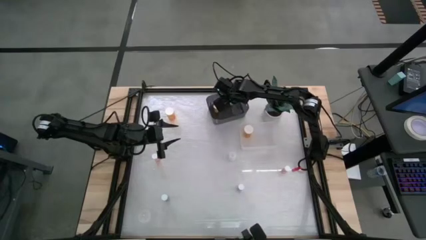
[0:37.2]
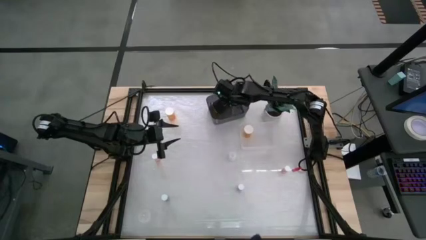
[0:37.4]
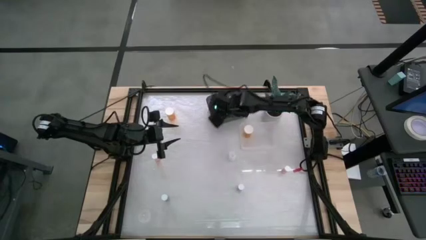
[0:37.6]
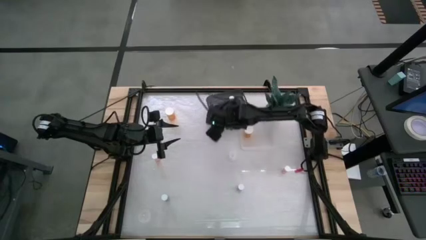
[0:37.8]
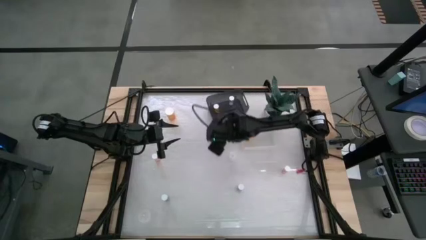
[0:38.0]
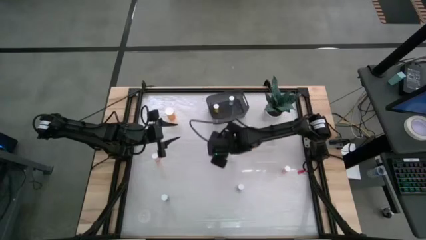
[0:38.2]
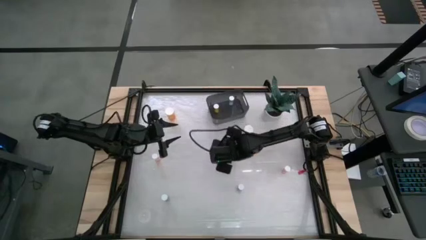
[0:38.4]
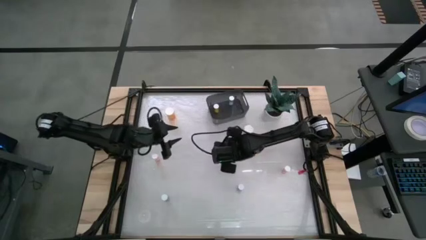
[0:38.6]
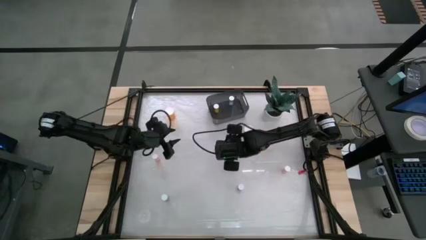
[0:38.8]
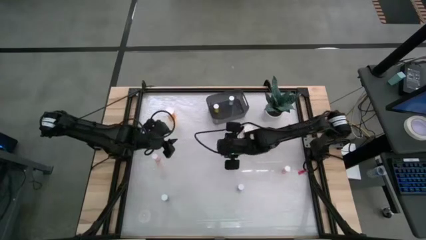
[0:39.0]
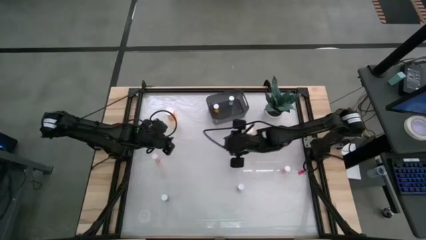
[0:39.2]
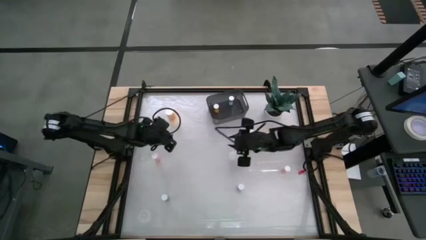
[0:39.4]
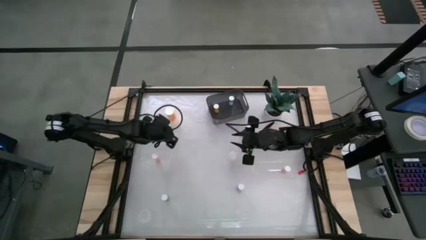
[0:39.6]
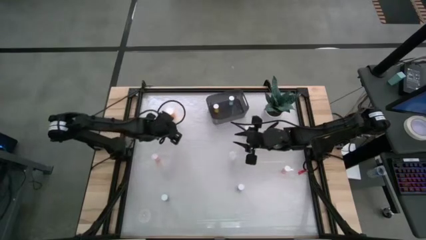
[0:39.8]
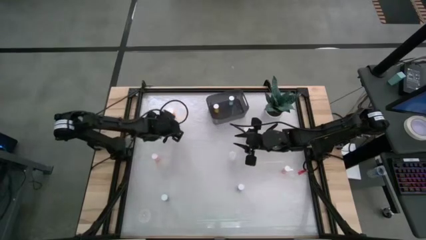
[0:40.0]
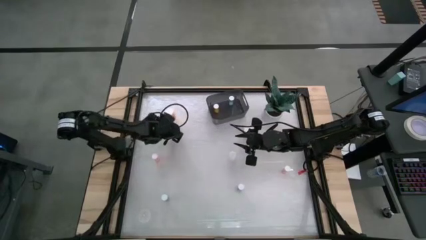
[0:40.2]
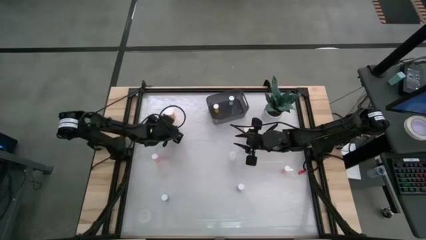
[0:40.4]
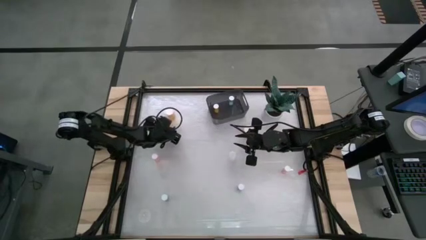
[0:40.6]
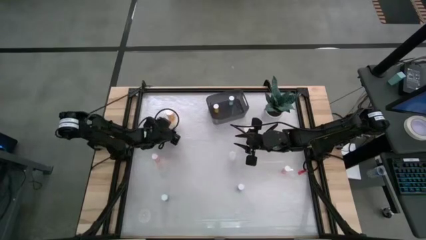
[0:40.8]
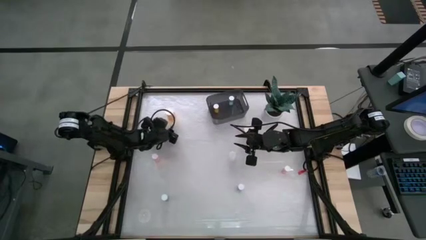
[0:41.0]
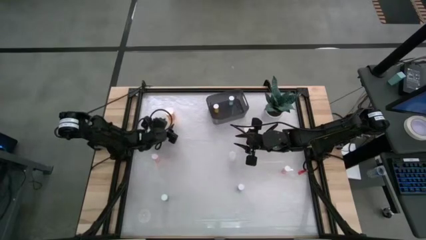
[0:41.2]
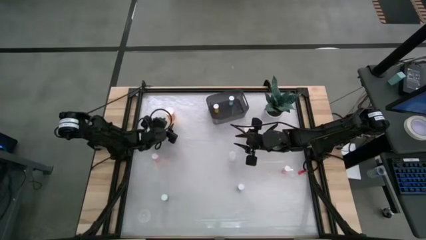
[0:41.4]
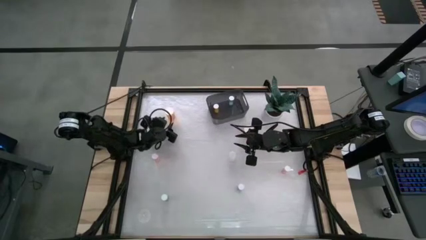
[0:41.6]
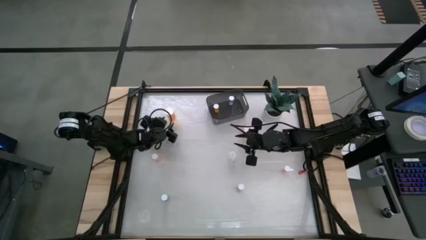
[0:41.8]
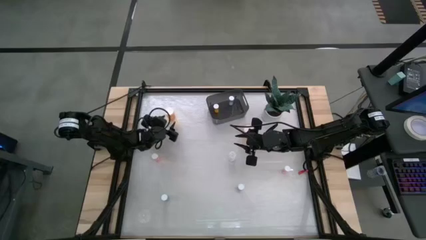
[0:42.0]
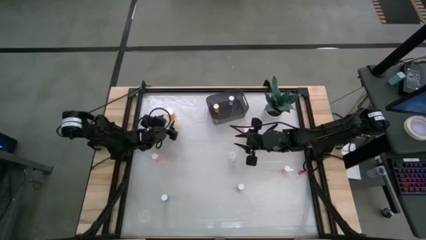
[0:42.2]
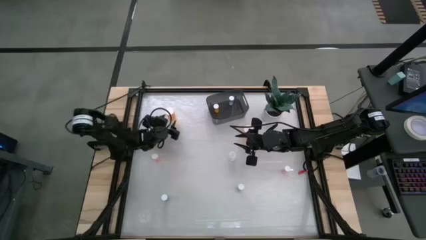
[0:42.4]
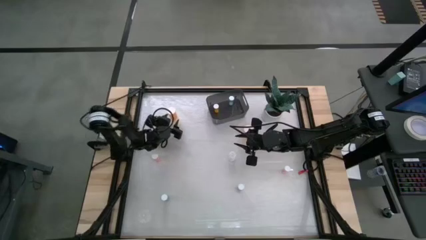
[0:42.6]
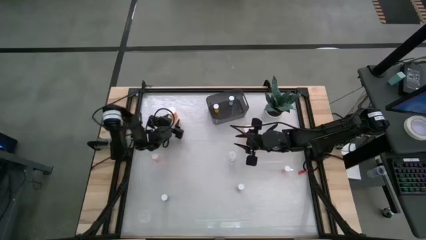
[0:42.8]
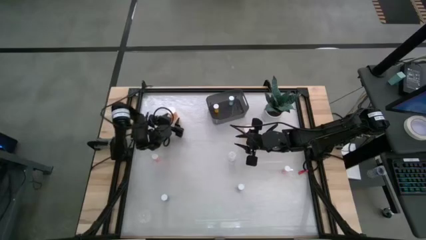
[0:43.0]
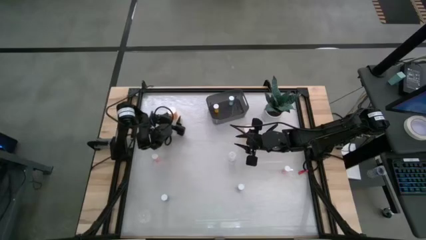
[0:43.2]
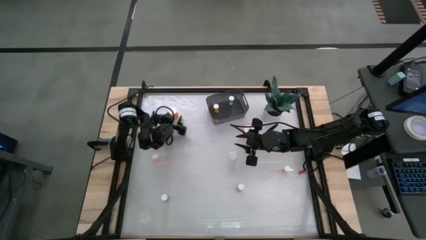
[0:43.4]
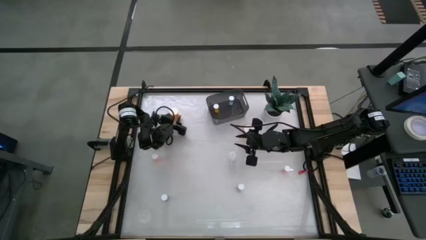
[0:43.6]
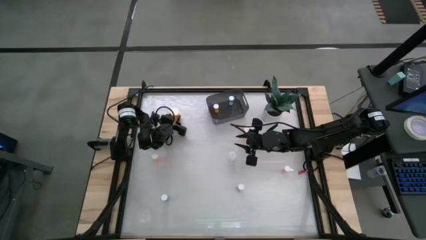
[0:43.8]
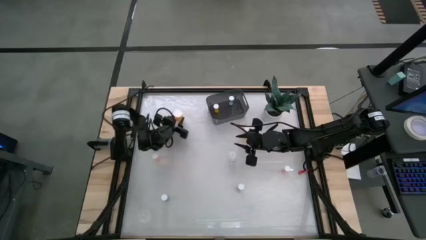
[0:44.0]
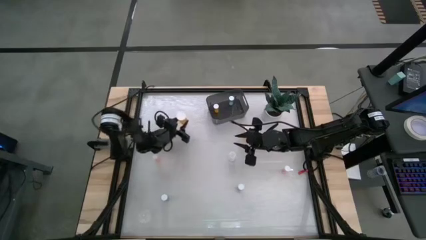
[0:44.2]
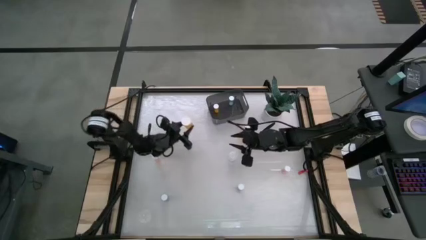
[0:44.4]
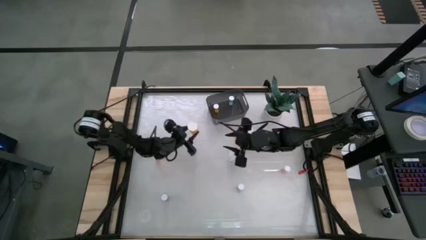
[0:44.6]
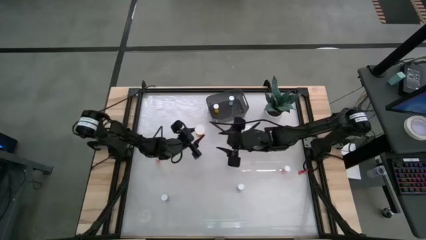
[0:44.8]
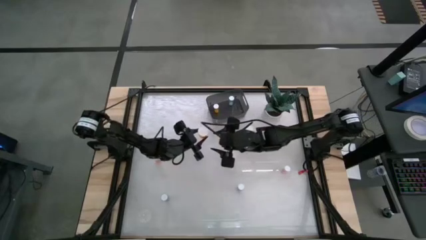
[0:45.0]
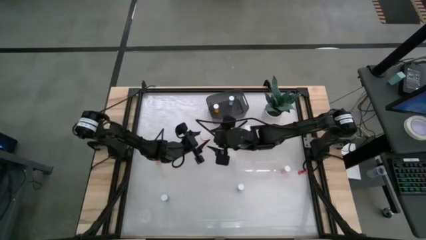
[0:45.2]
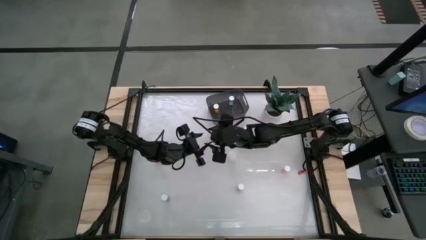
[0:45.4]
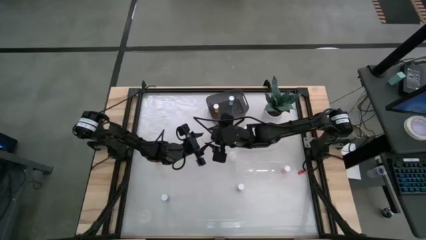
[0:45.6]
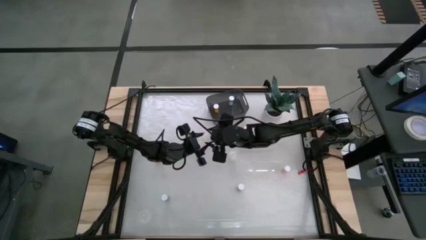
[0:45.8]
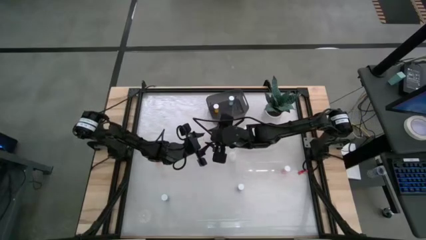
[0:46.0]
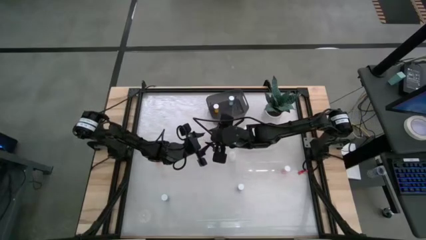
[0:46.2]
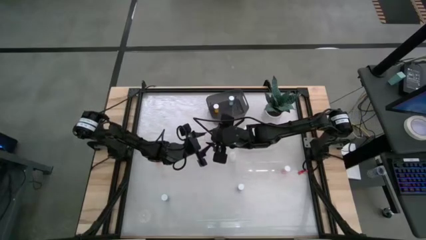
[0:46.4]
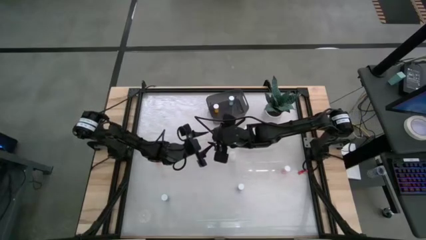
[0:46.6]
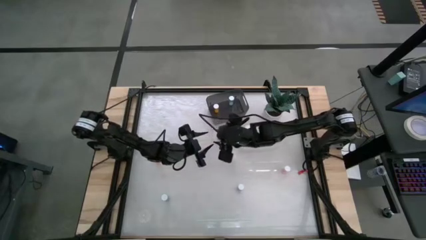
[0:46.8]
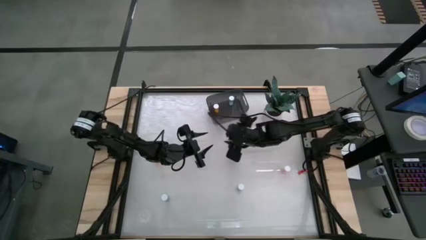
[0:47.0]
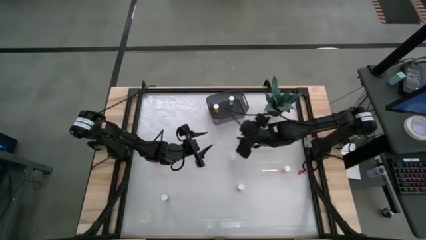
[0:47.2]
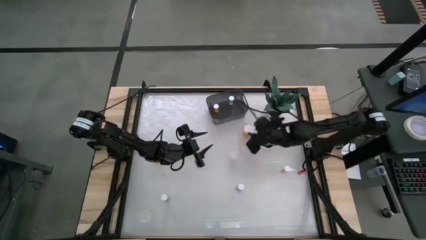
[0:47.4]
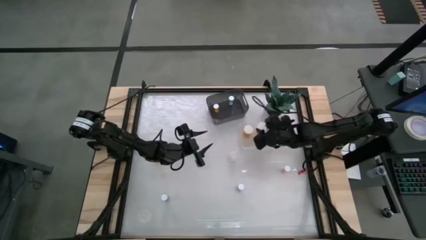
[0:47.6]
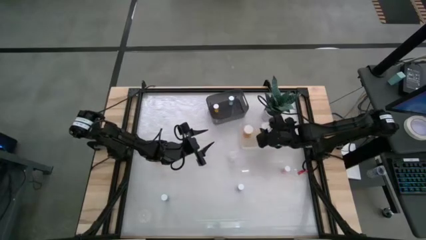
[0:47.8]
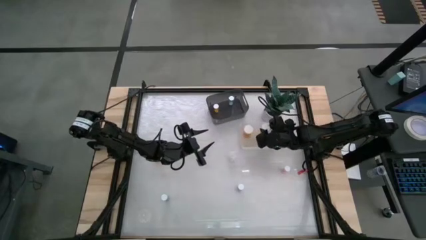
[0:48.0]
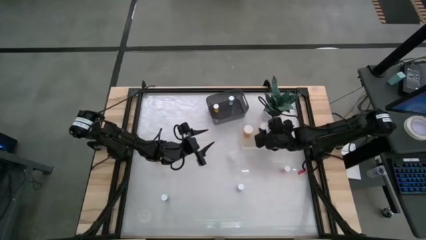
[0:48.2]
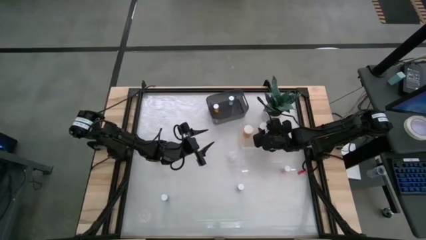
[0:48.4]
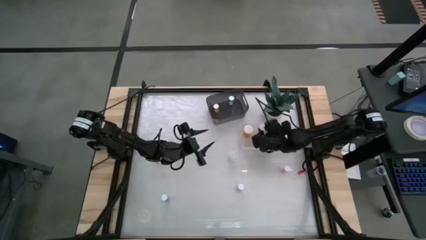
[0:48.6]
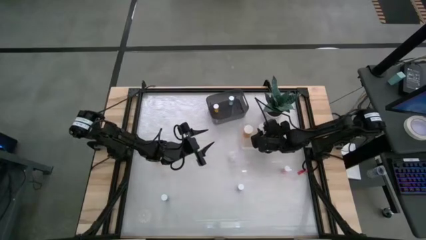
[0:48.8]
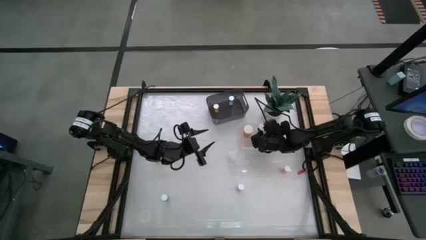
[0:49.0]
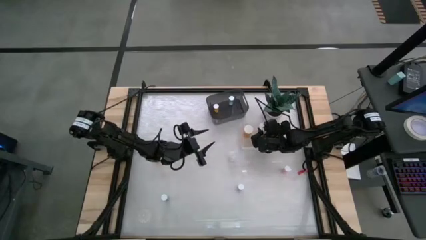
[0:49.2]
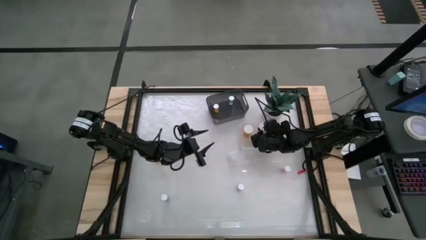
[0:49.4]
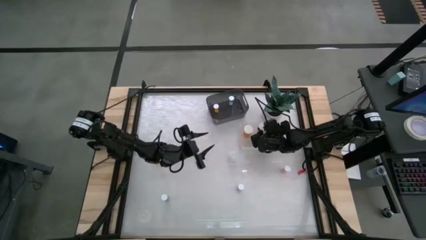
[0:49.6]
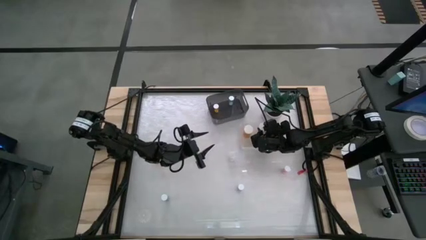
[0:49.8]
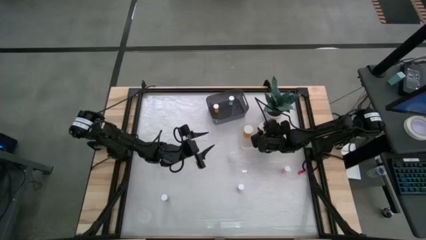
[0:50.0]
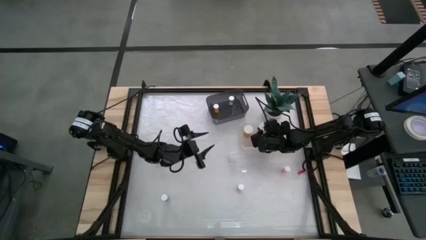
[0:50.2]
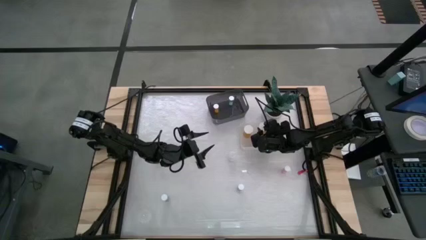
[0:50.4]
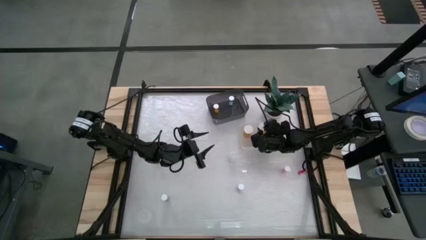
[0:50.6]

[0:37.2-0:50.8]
Task: Pick and place medicine bottles into bin by pill shape (circle, oval)
Put the big yellow pill bottle into the transparent bin

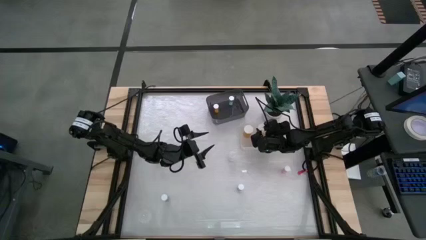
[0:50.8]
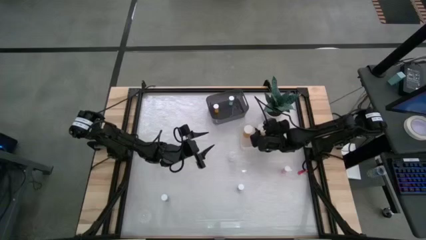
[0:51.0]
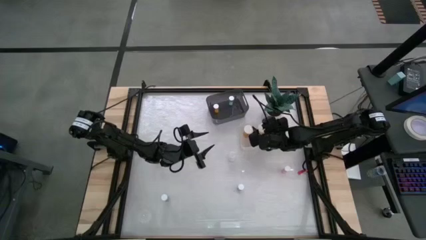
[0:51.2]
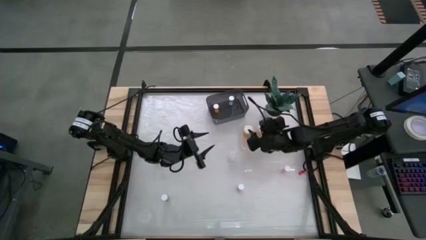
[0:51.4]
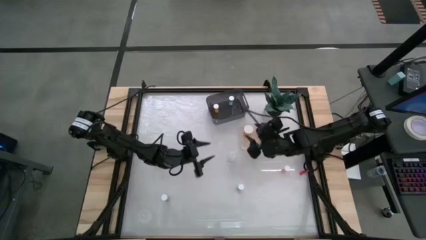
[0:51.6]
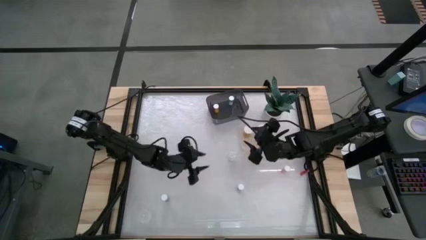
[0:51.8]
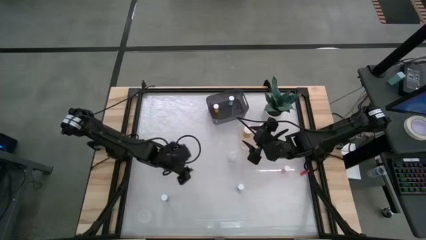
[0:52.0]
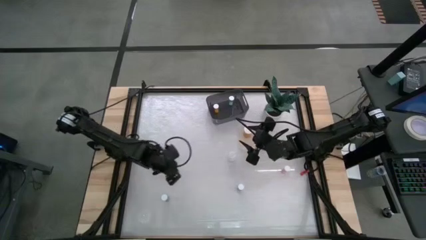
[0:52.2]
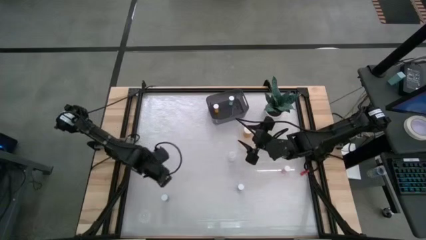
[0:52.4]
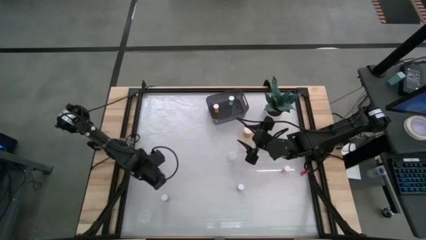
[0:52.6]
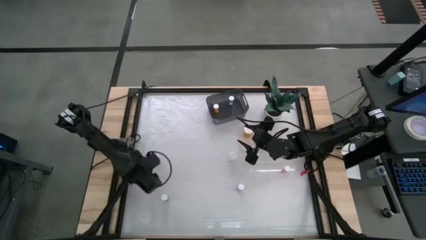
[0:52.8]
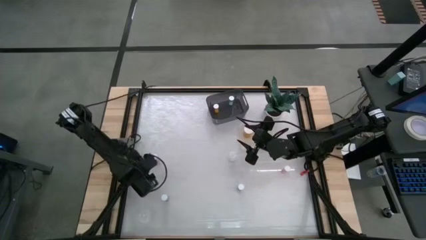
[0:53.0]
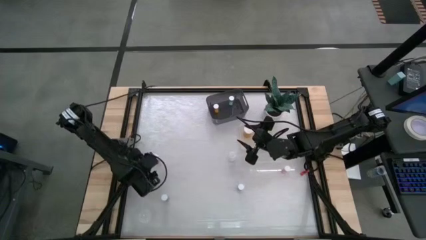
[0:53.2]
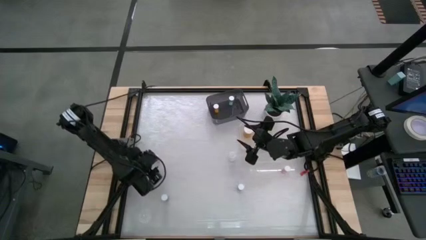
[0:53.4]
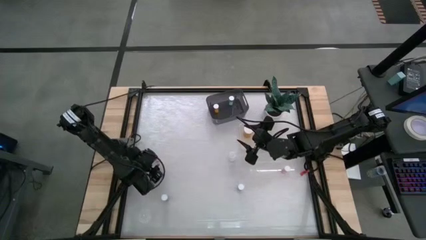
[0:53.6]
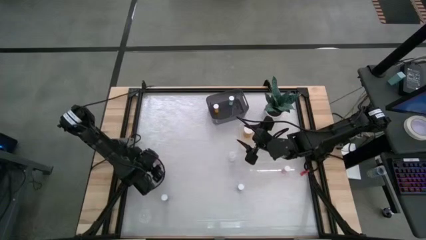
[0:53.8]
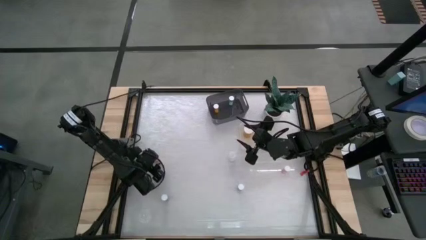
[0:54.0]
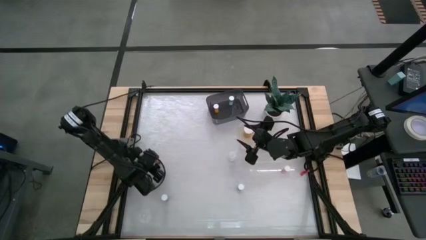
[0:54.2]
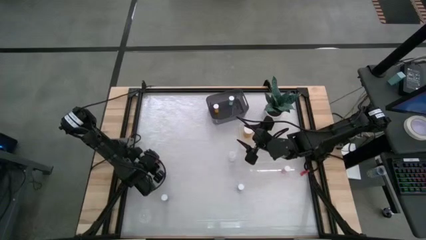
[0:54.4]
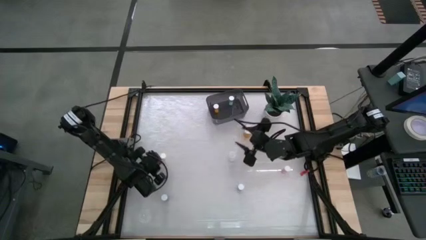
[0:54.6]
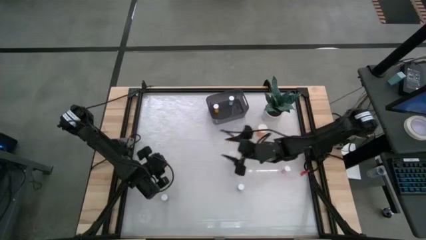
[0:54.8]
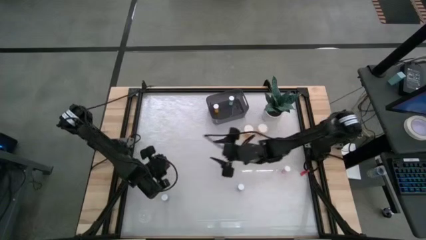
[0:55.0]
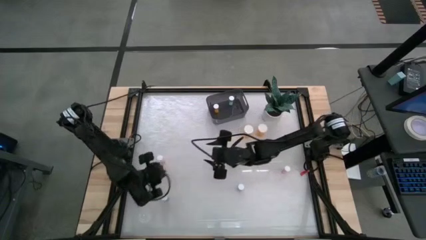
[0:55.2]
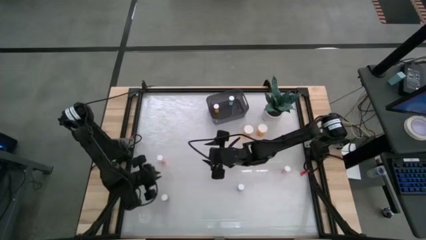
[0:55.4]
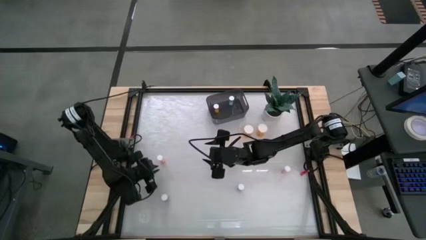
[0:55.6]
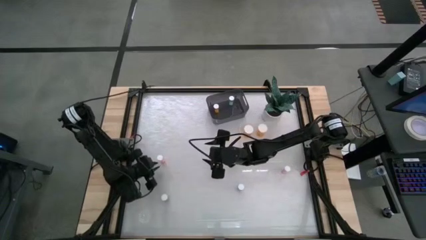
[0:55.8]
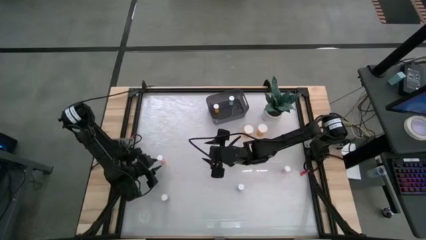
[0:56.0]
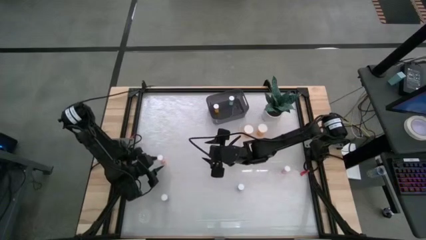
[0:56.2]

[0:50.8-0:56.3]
Put the left small pink pill bottle into the black bin
